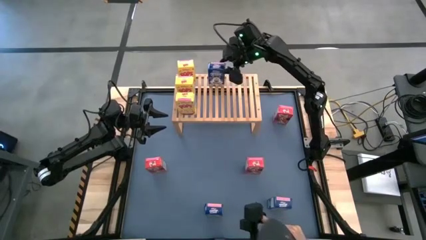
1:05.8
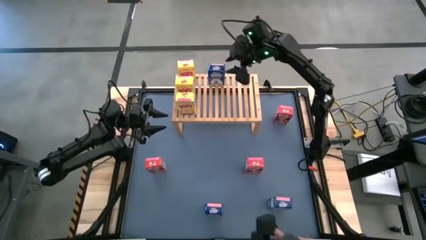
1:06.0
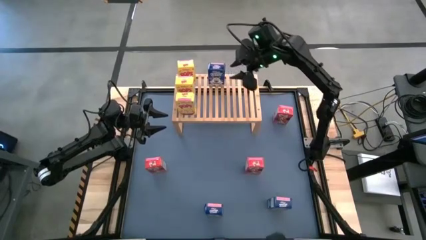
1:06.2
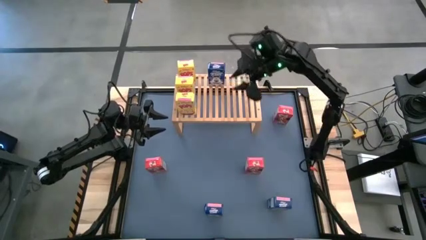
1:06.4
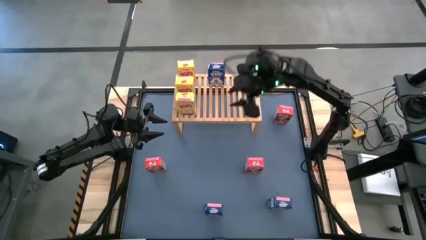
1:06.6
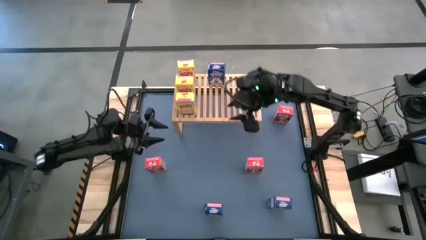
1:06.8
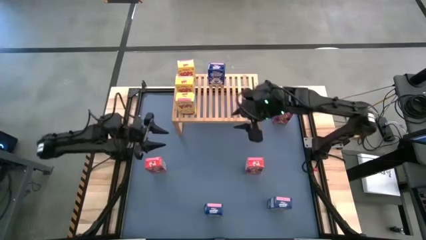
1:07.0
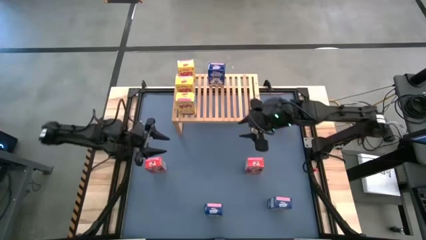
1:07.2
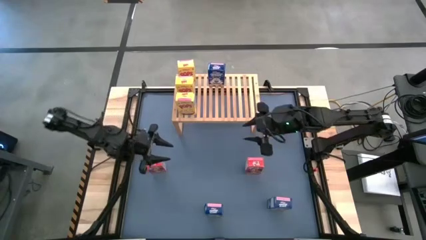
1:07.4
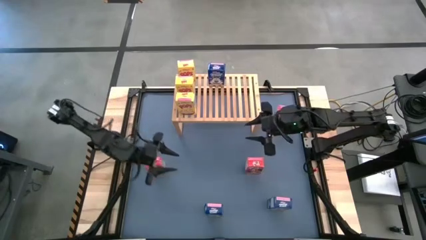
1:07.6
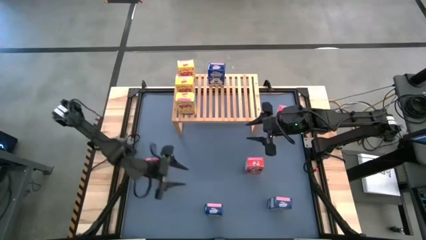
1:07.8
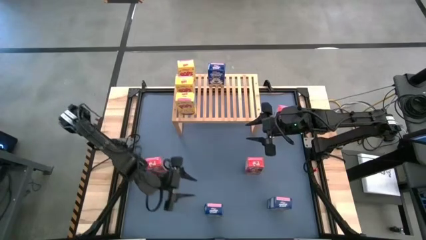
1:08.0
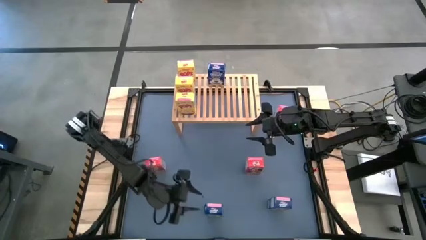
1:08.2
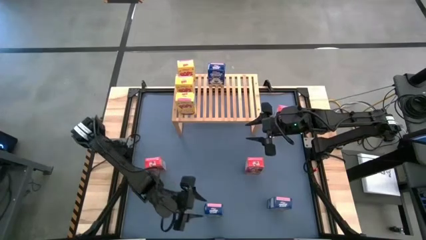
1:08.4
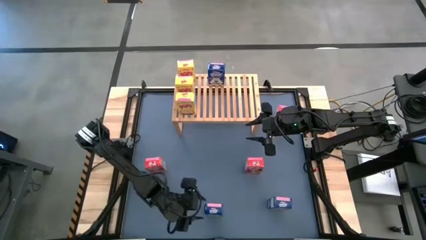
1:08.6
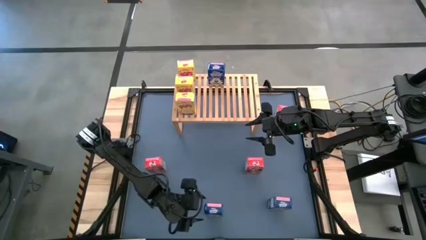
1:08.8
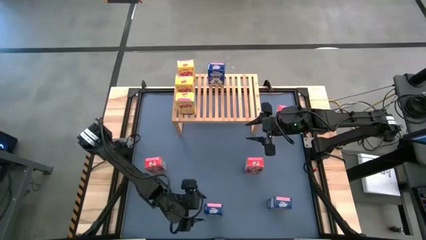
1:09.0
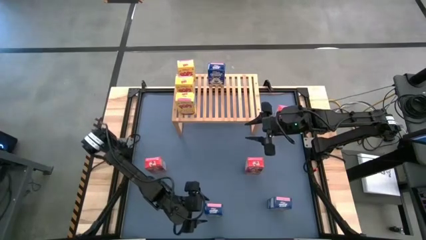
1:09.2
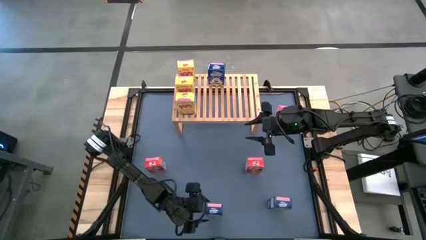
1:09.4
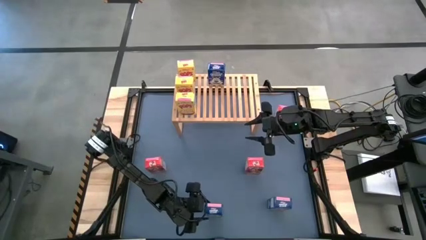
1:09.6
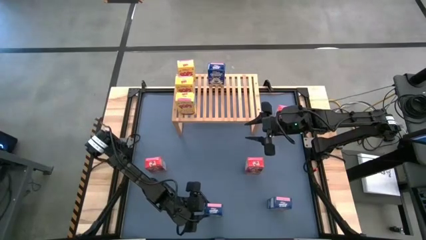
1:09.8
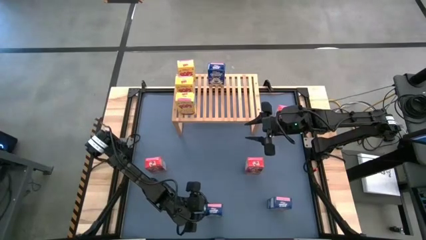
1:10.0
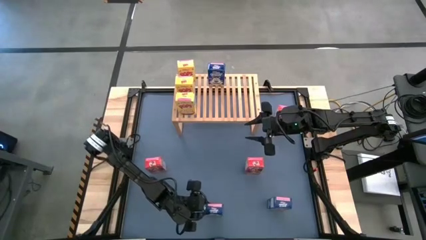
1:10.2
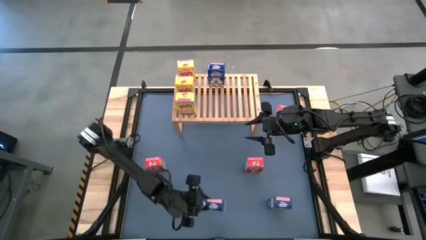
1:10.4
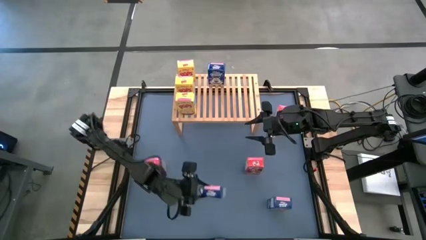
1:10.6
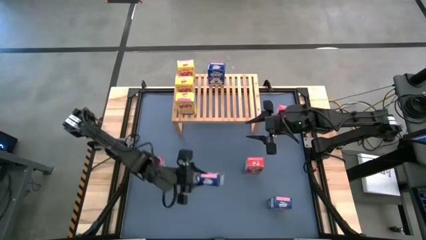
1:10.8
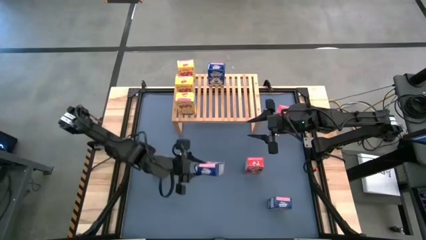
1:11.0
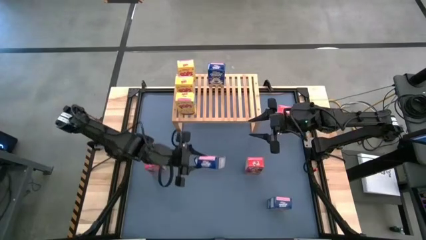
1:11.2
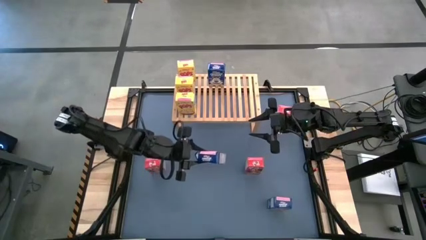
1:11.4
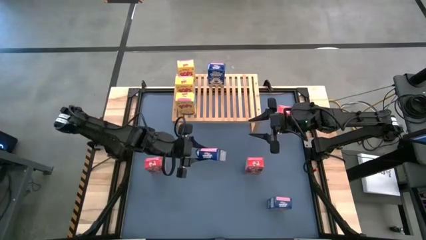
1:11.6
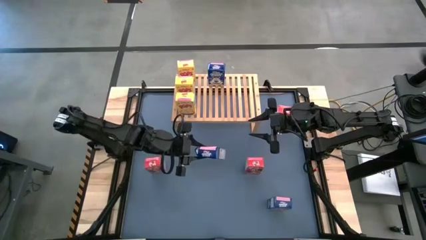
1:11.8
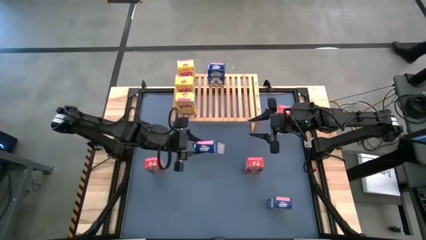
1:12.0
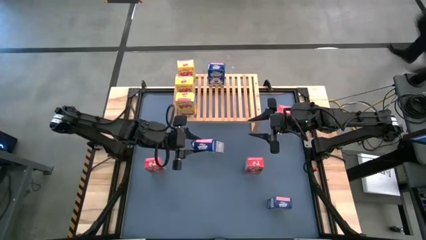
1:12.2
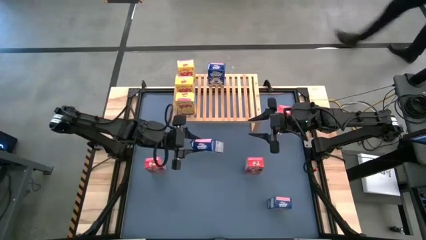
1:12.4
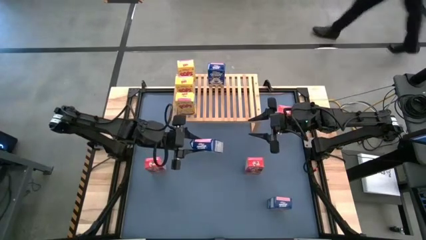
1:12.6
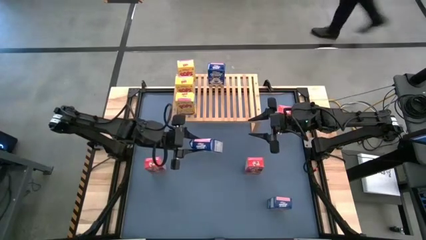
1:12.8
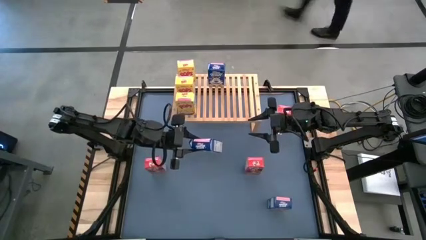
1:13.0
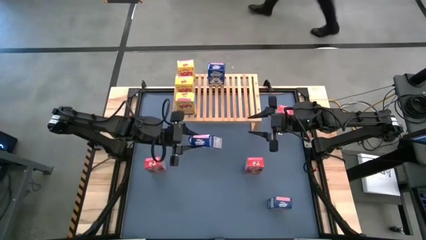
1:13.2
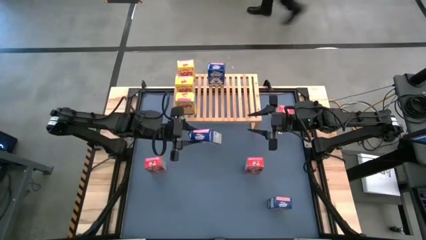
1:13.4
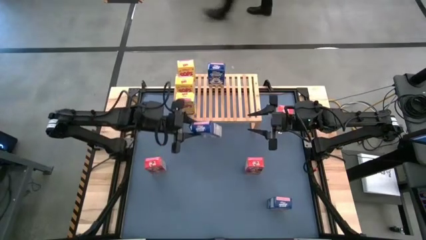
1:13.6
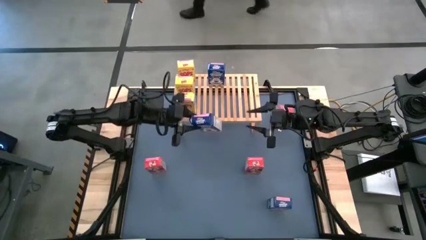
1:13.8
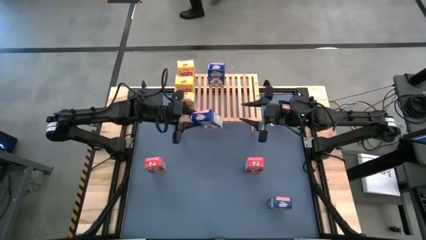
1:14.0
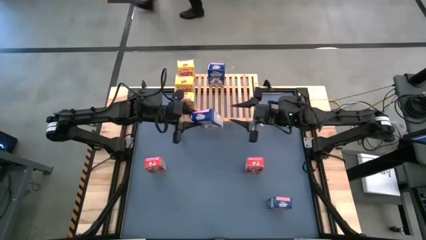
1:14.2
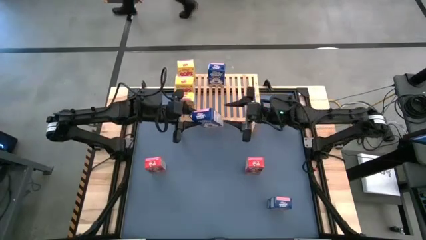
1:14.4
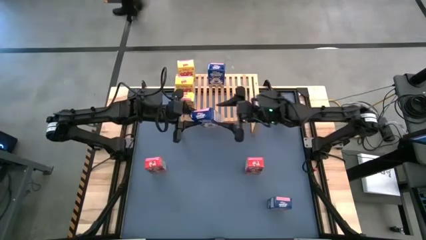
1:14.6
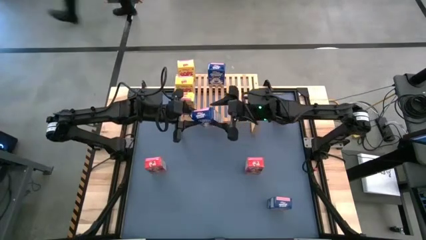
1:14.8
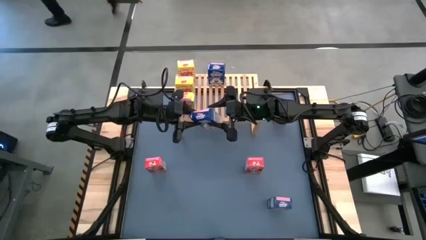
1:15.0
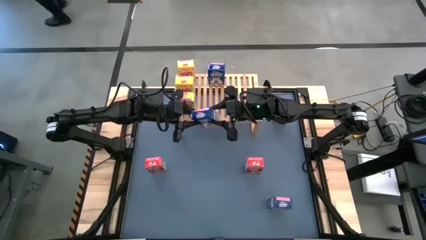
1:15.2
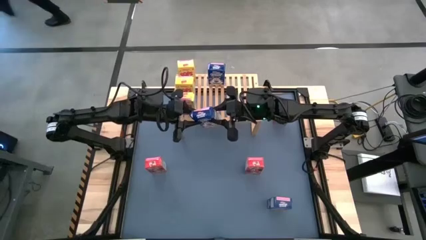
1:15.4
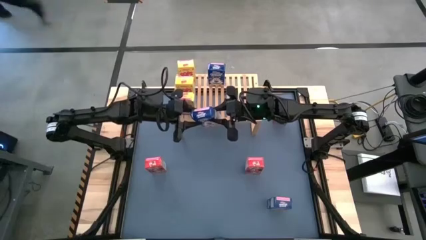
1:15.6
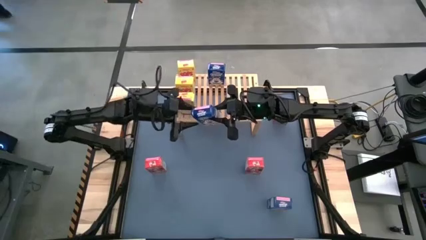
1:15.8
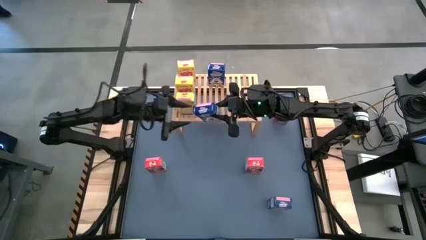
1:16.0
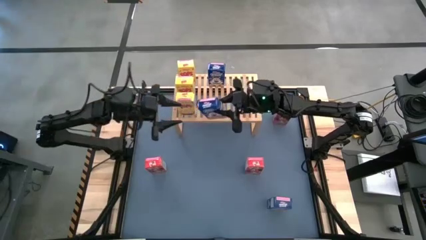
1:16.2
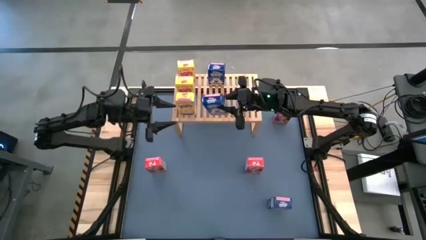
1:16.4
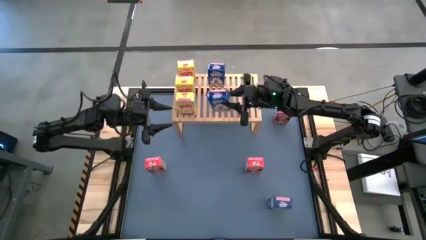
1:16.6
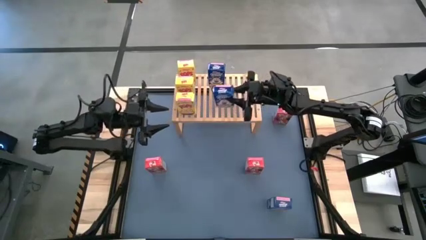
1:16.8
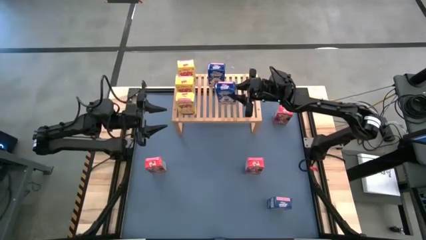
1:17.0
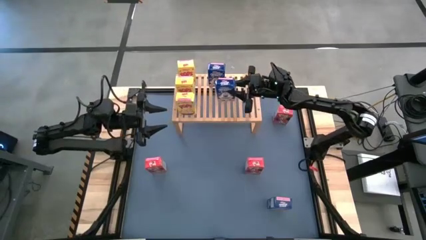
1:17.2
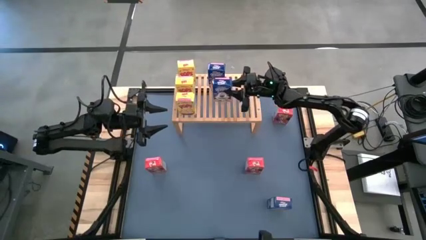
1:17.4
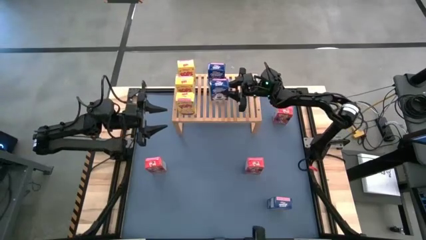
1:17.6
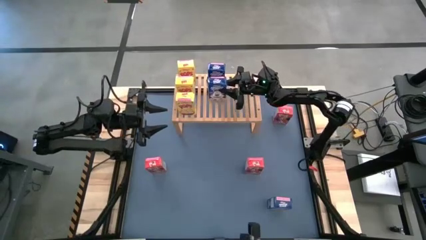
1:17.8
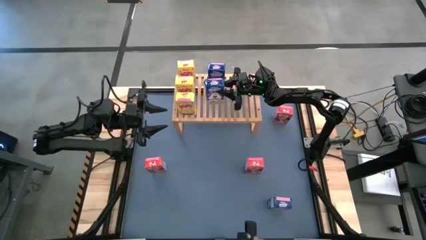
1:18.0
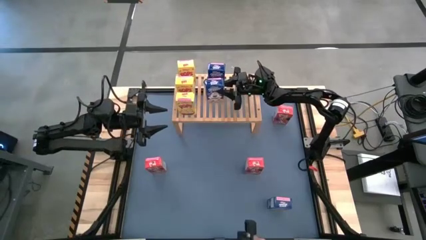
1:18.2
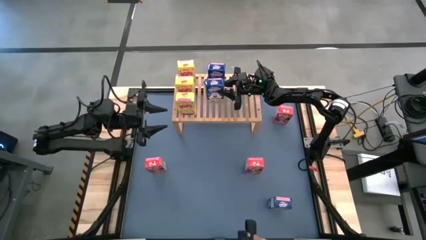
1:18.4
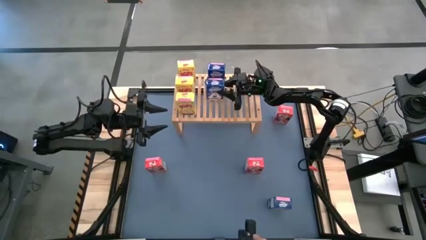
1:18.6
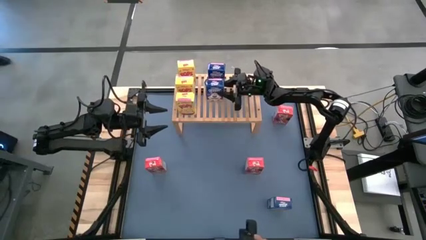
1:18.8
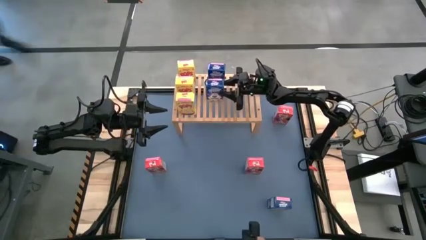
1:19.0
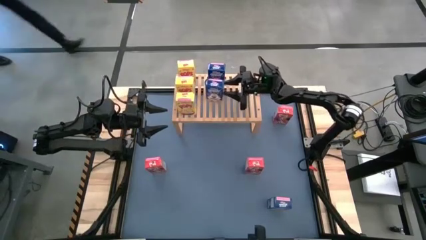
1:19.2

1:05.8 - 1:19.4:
Task: Stack cereal on shelf
Put the left blue cereal box on the shelf aligned with the other blue cereal box

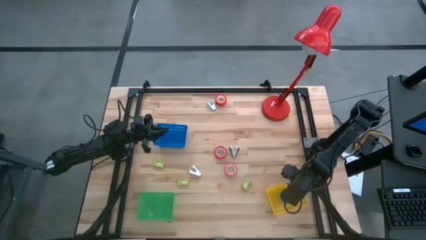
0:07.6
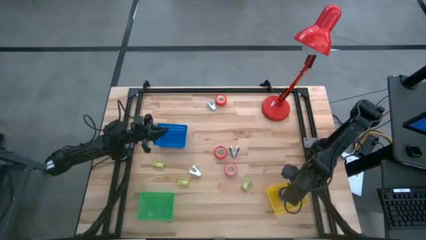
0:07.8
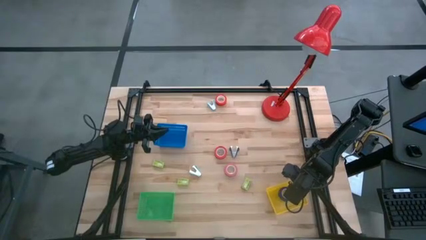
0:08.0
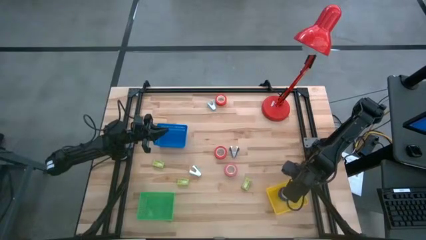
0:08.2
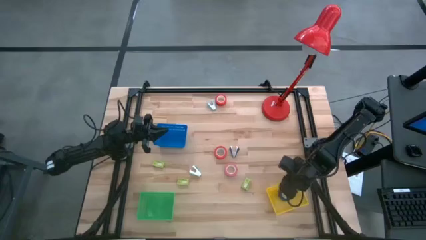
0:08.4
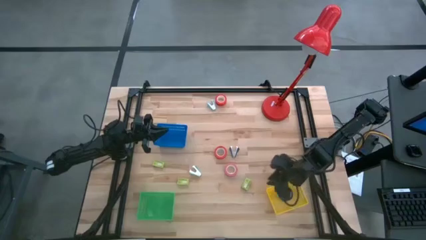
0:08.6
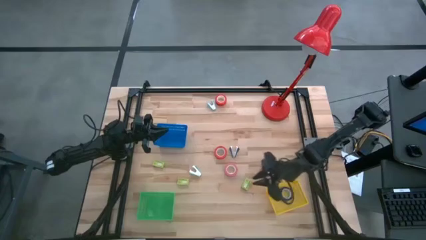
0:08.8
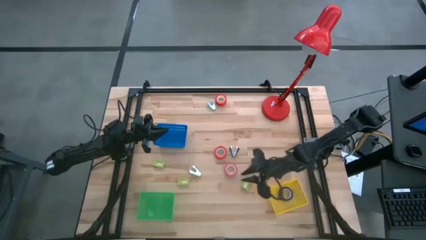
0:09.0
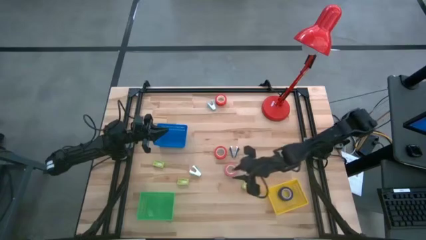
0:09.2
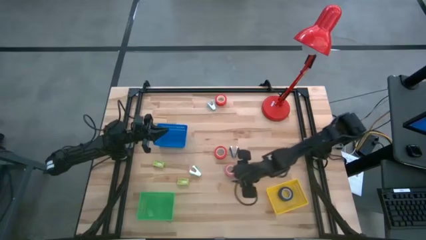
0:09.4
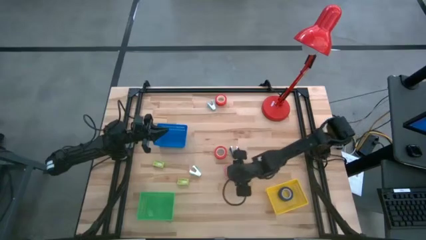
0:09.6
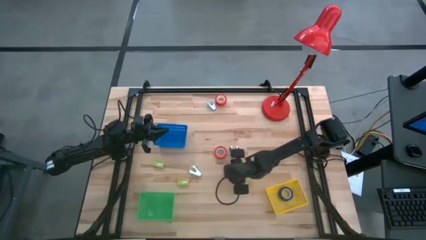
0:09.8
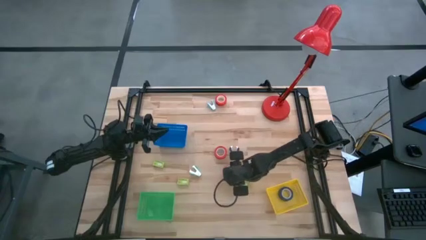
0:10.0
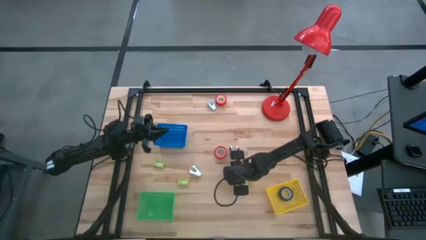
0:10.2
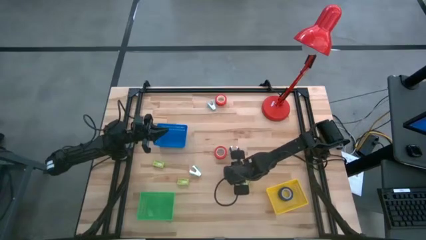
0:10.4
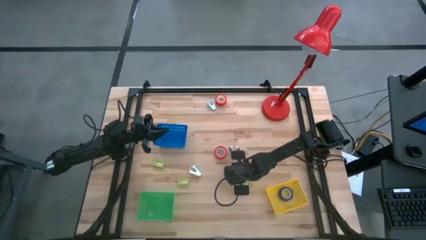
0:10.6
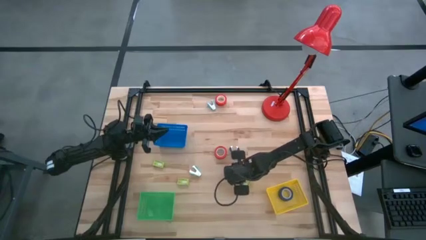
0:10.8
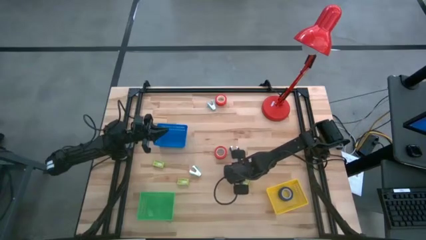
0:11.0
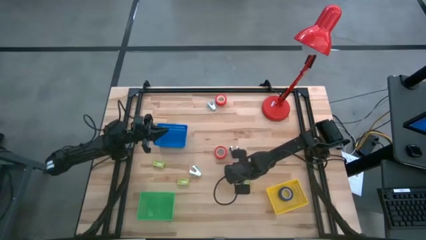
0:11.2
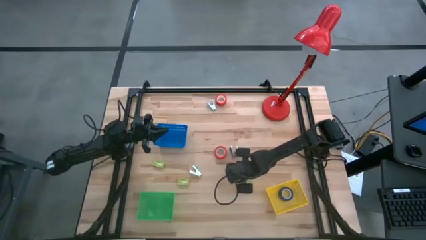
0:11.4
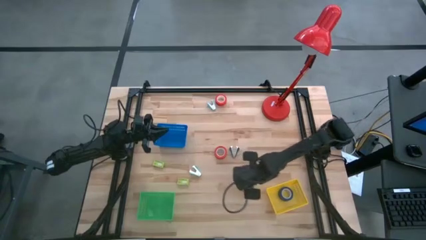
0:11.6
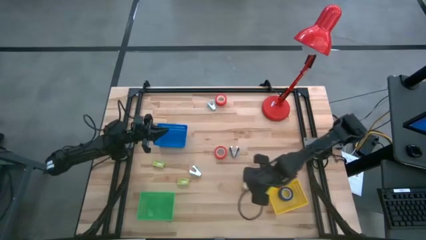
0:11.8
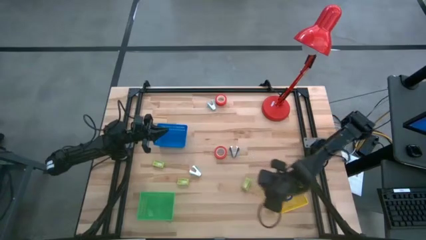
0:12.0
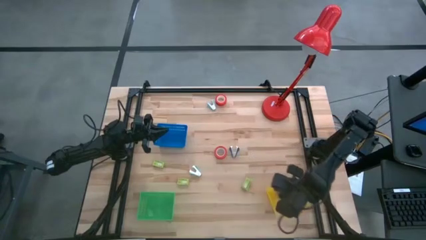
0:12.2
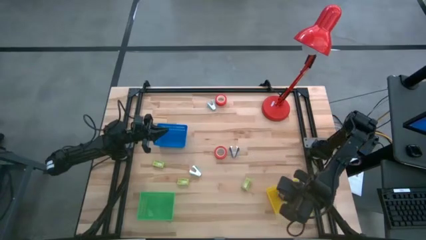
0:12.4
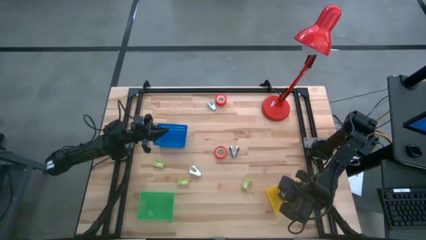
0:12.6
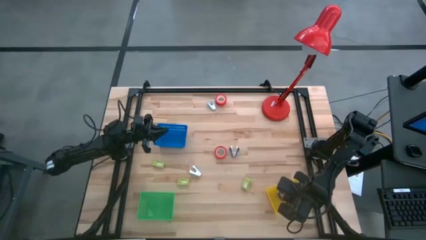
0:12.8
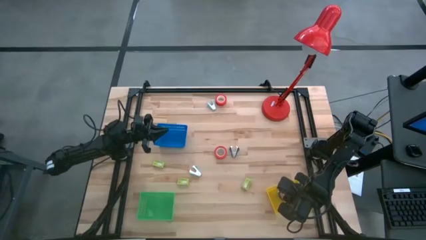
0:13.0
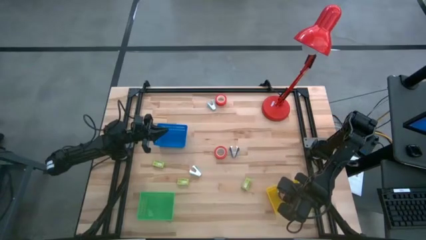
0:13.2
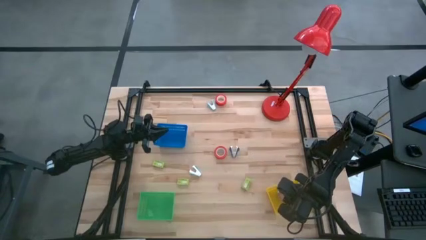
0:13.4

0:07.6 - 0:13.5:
Task: Pick and place Stapler, Stapler remover, tape
Put the pink tape into the yellow bin
